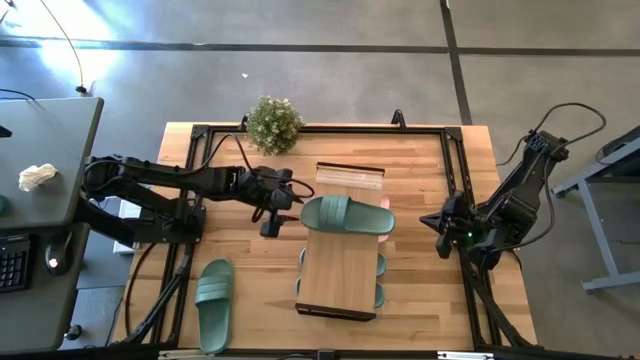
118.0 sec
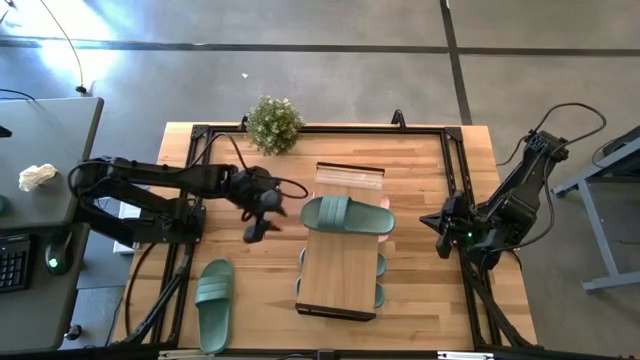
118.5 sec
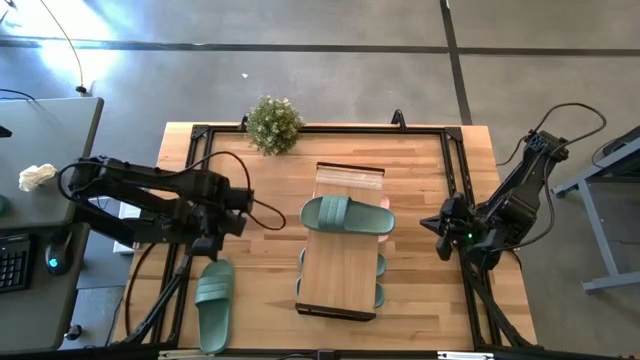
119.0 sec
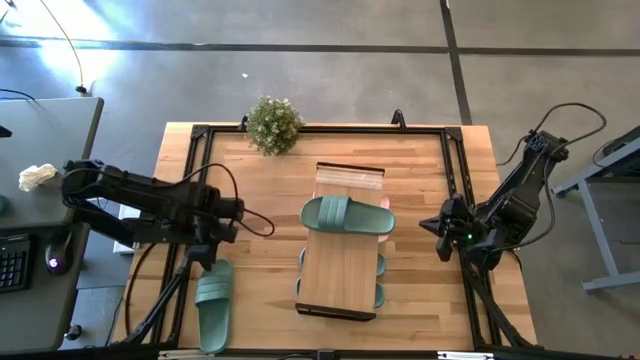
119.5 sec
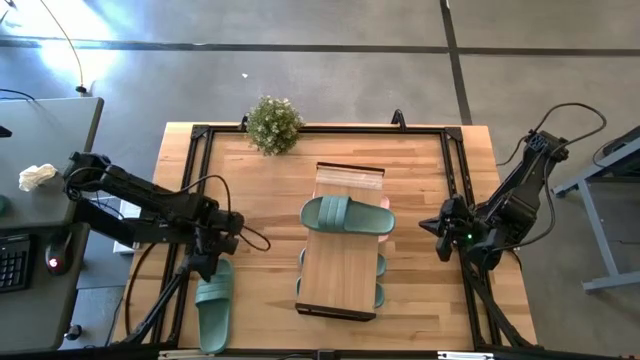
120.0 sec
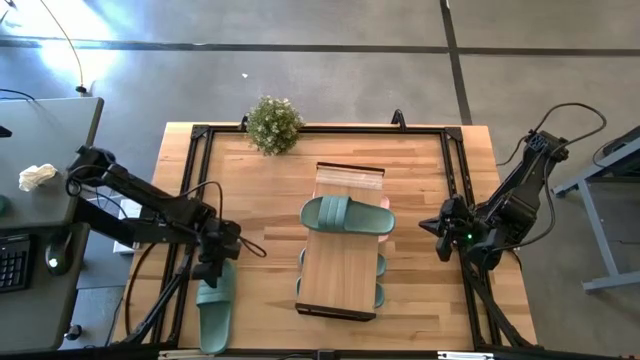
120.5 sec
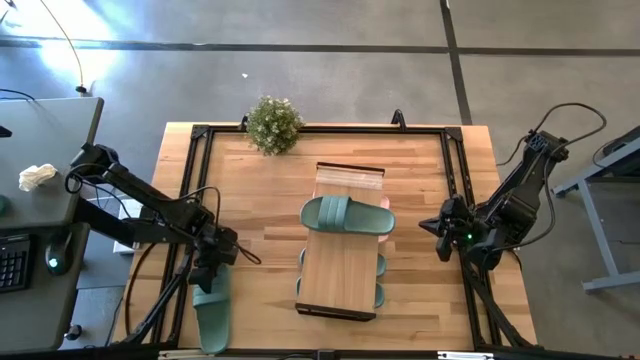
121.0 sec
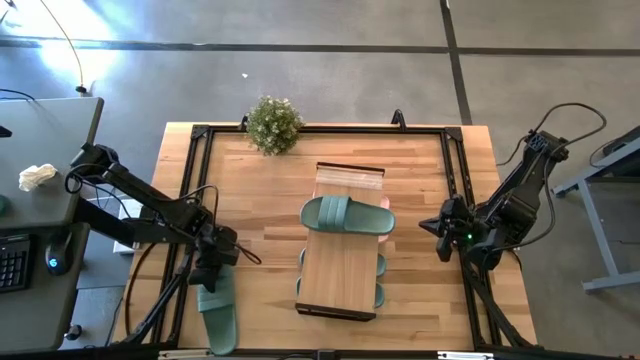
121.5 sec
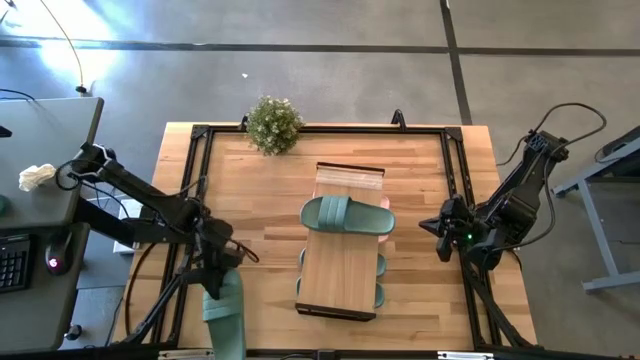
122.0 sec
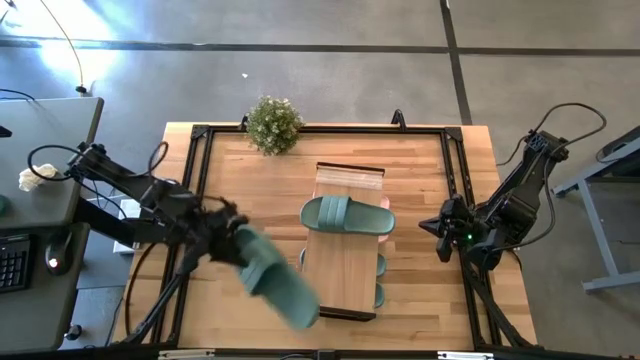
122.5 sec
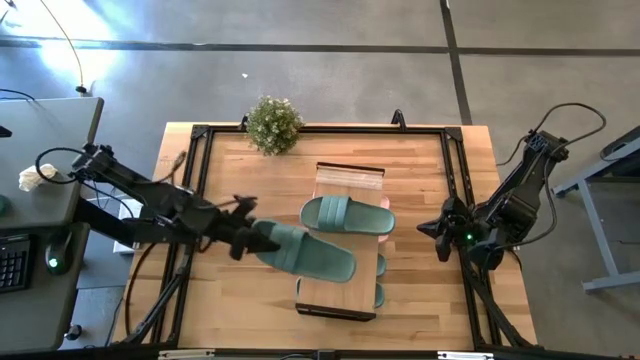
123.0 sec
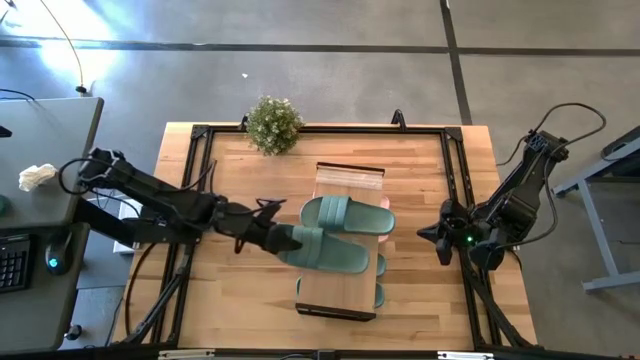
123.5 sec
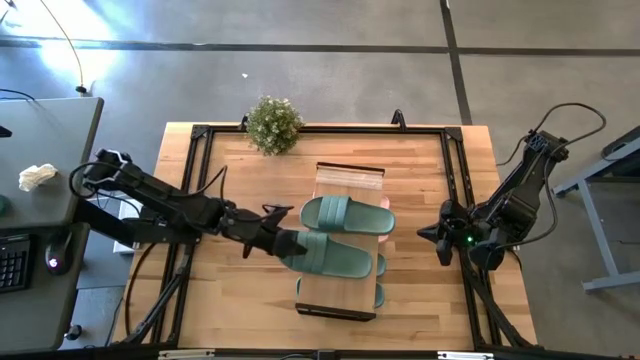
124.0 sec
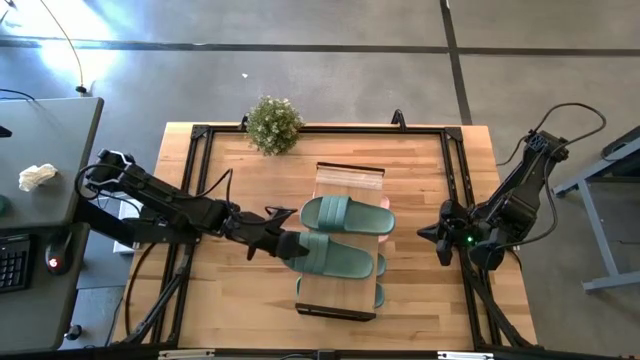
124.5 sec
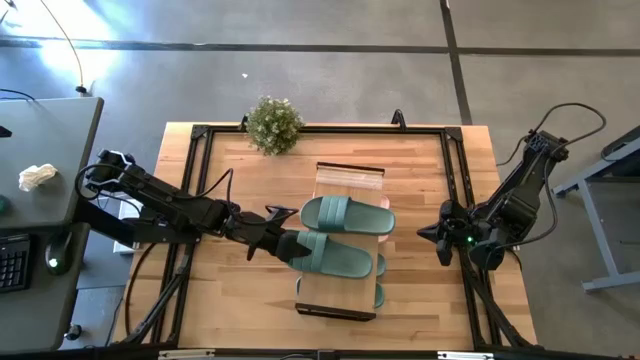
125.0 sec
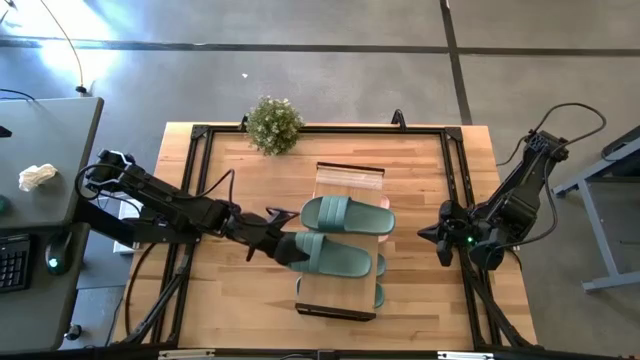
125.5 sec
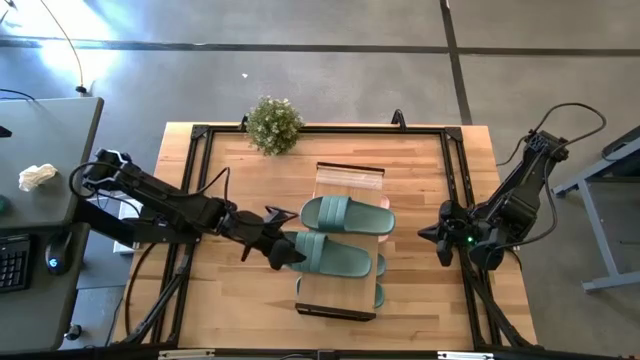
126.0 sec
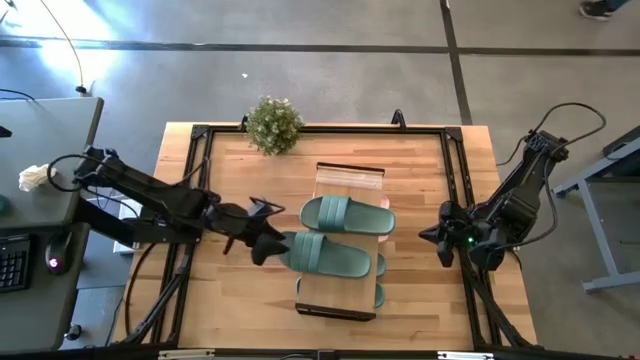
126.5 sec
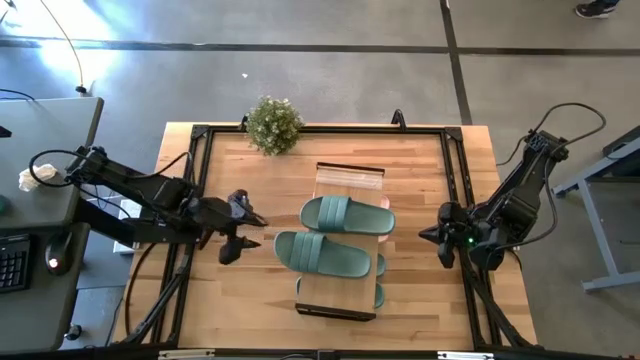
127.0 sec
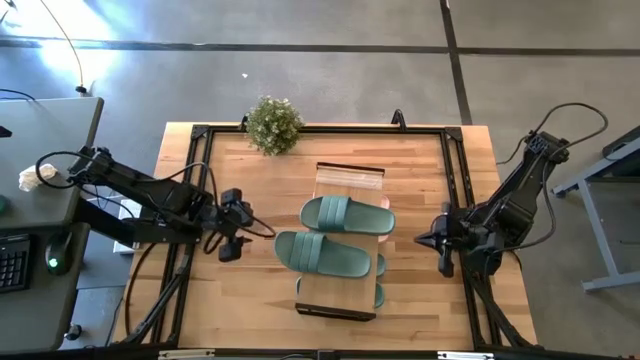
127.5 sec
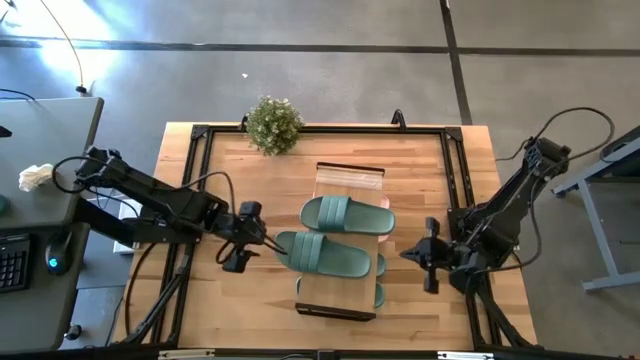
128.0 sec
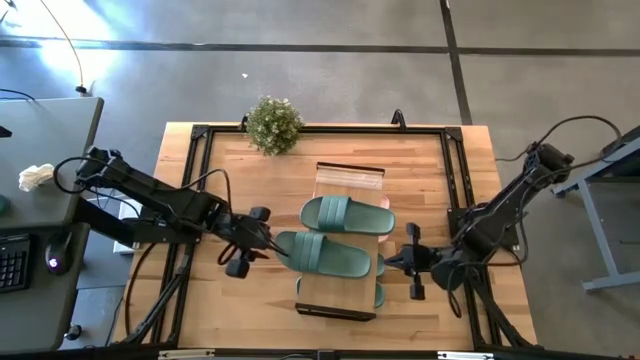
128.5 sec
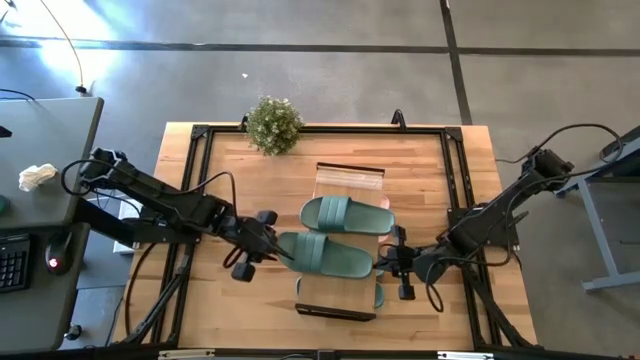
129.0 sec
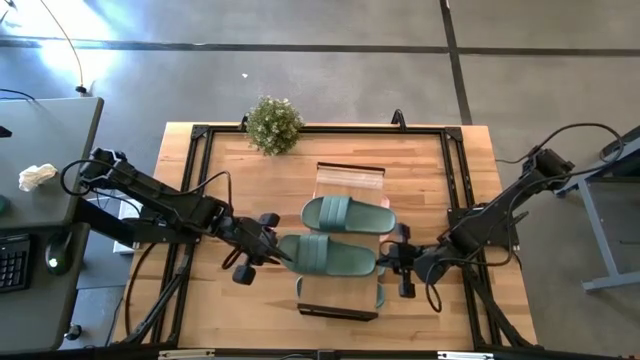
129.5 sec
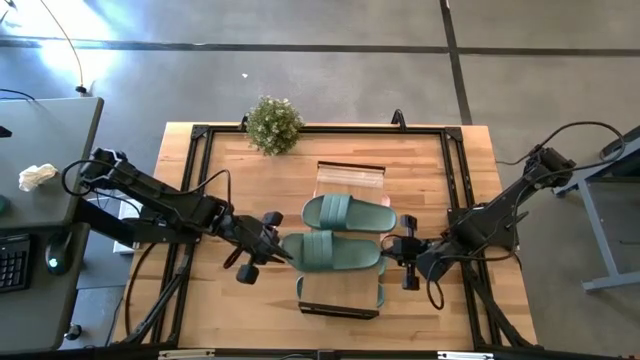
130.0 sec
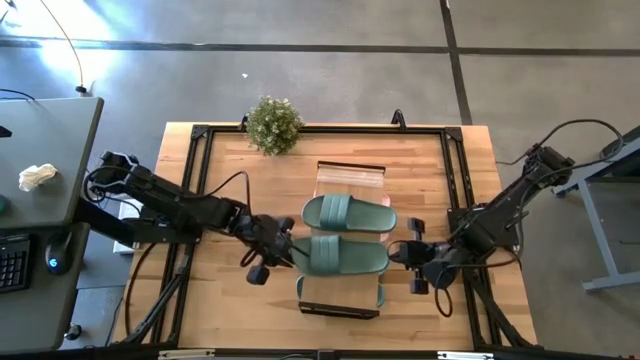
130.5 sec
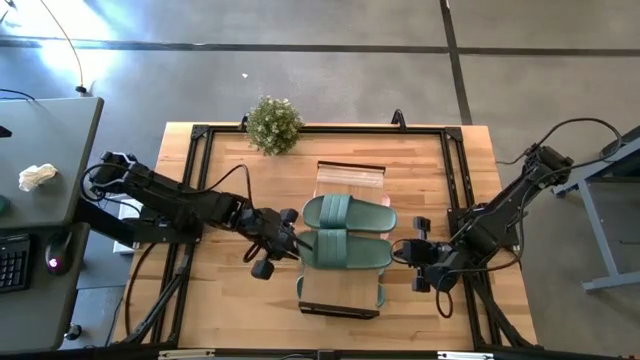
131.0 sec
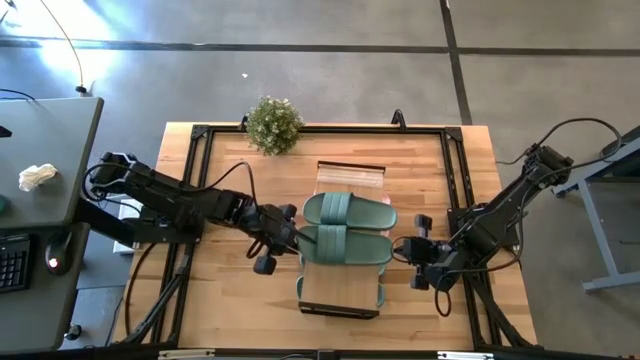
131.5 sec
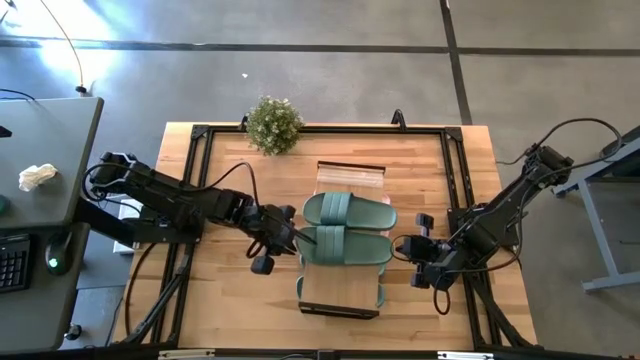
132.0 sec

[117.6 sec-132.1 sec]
Task: Pick and place slides into the shelf
Put the green slipper on the shelf

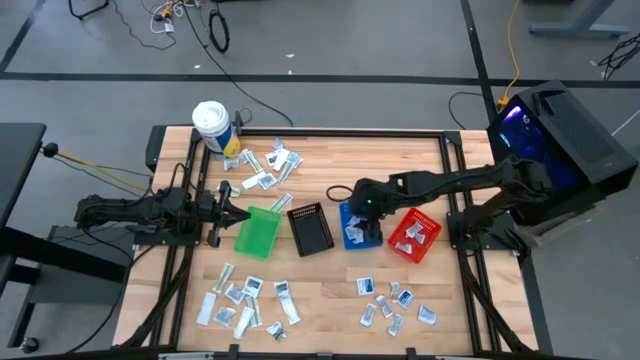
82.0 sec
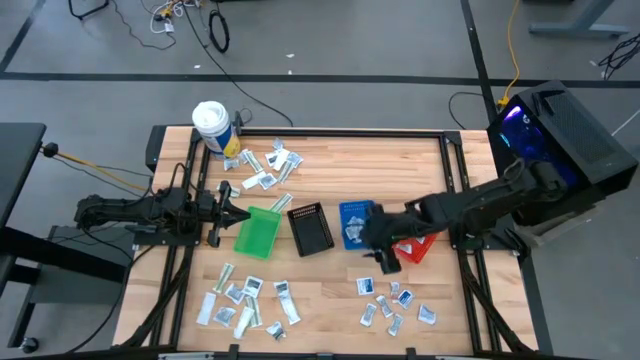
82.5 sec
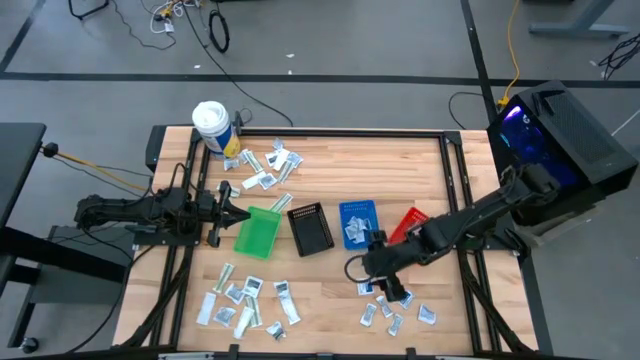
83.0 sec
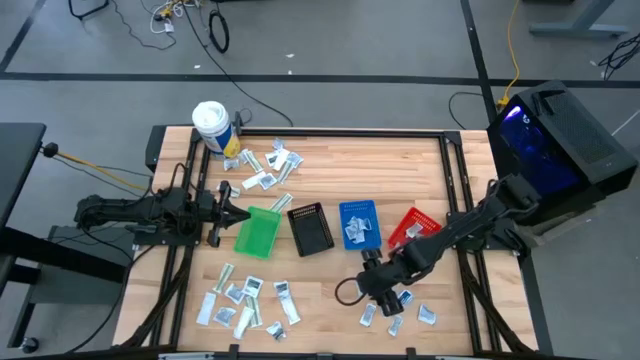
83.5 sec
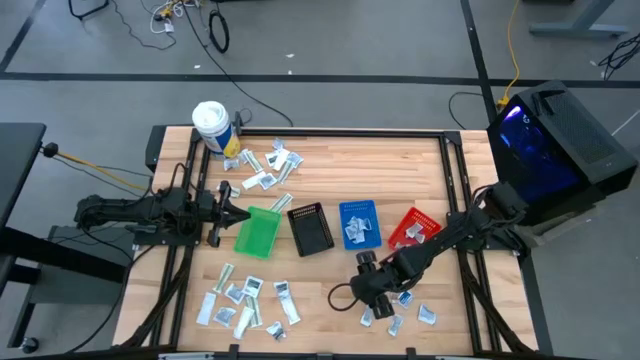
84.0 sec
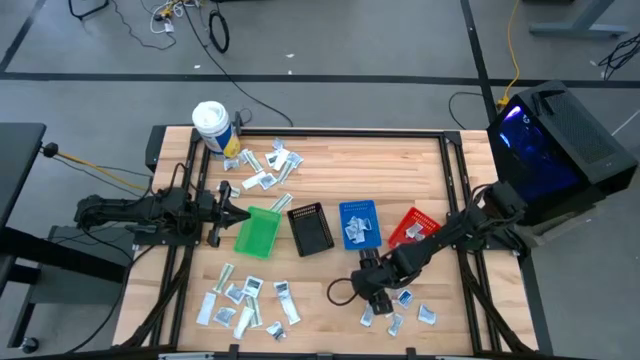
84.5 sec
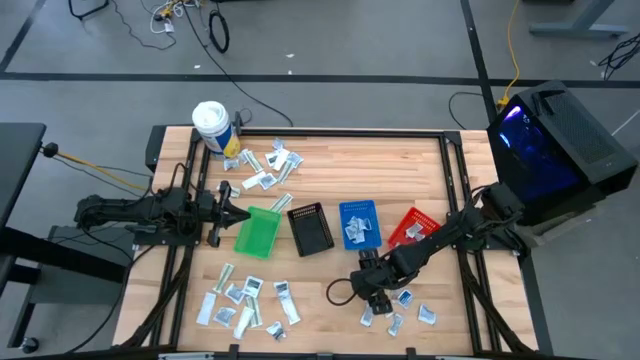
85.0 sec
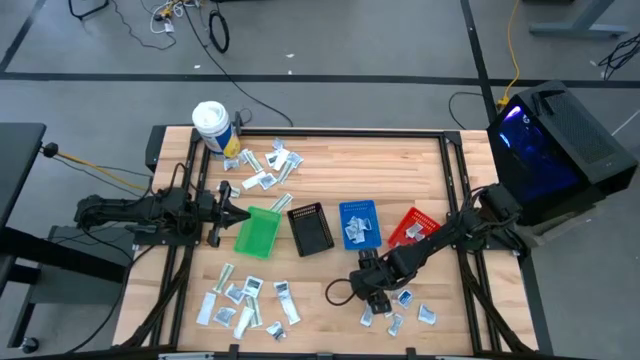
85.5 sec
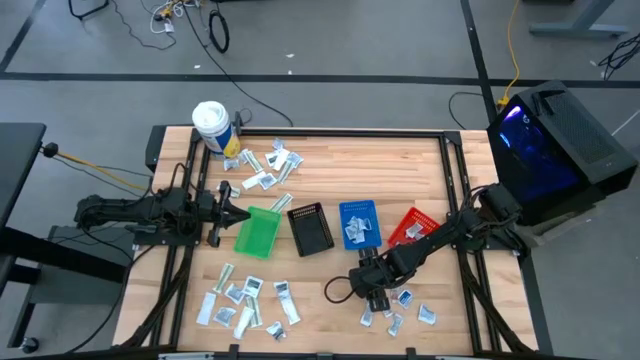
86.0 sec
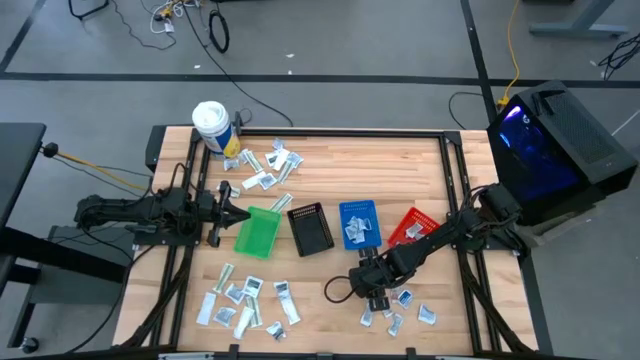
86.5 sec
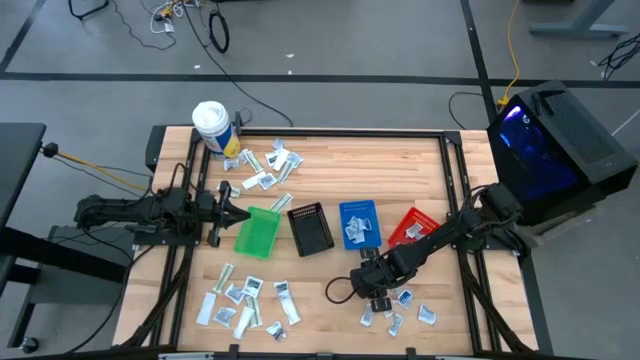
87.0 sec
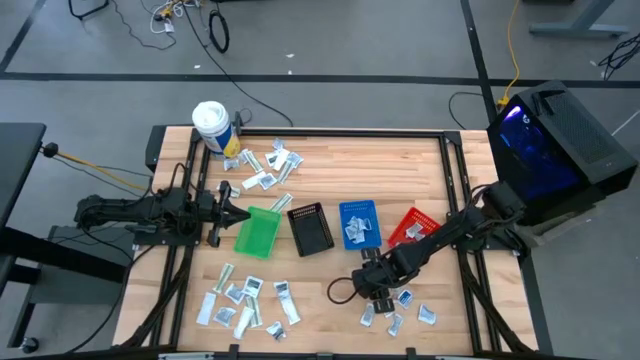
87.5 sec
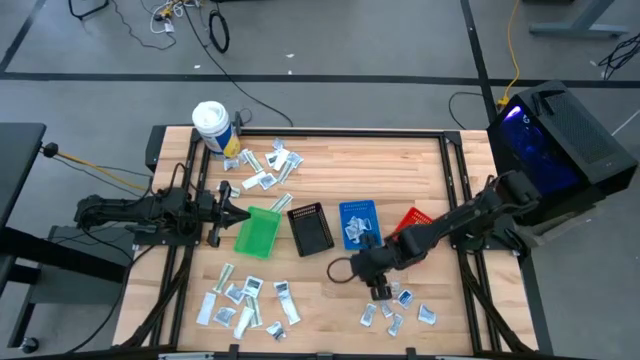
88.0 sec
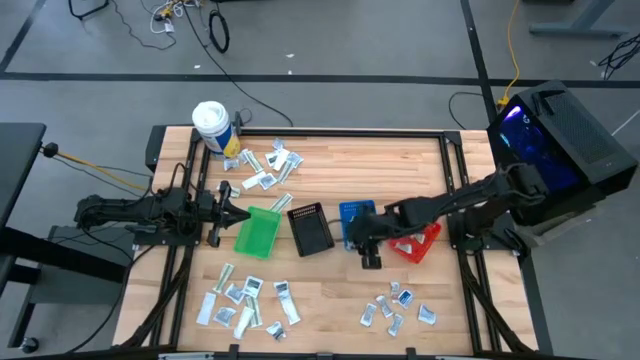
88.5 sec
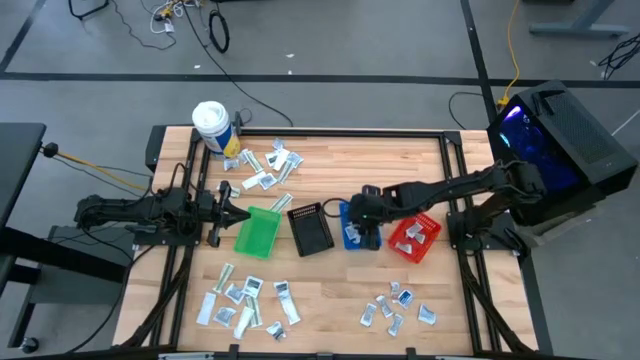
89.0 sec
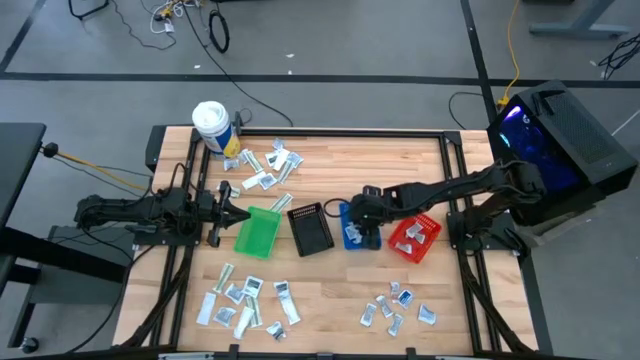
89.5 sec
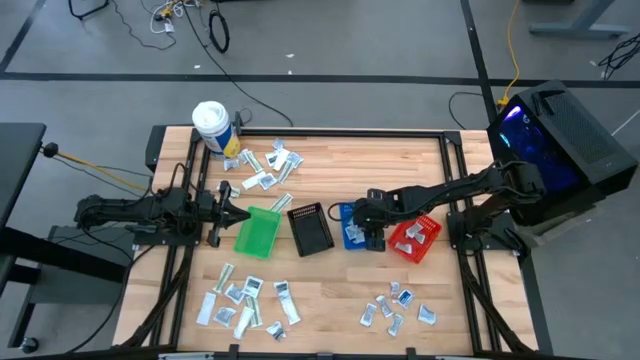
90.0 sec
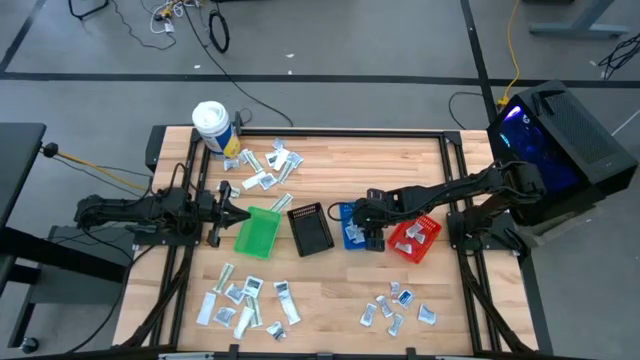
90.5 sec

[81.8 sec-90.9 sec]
Task: Pick & Place First Aid Supplies
Put the alcohol pad into the blue basket
